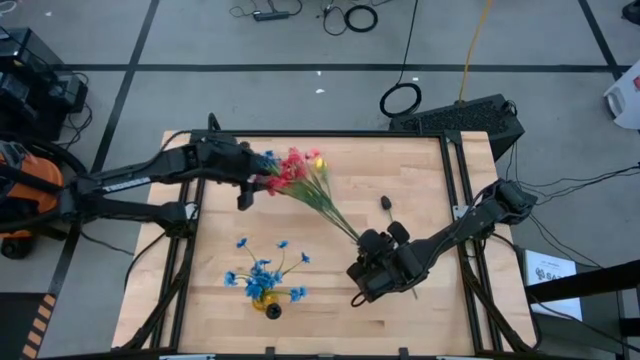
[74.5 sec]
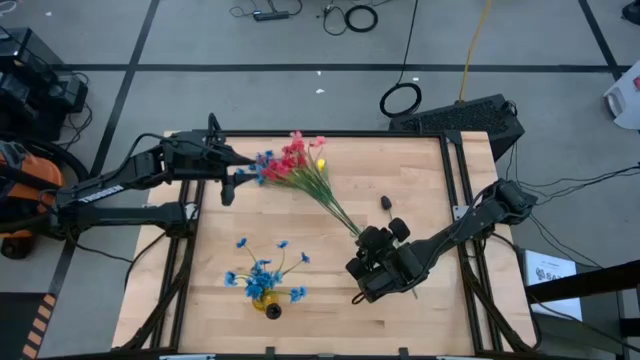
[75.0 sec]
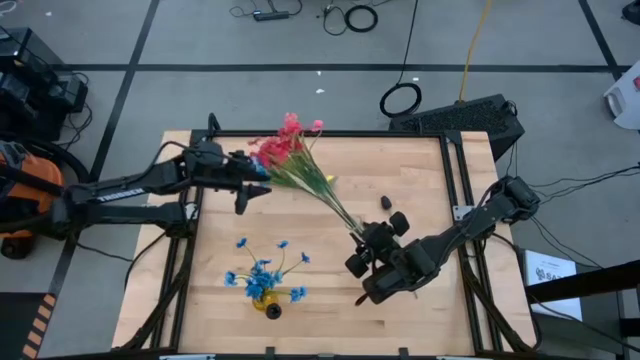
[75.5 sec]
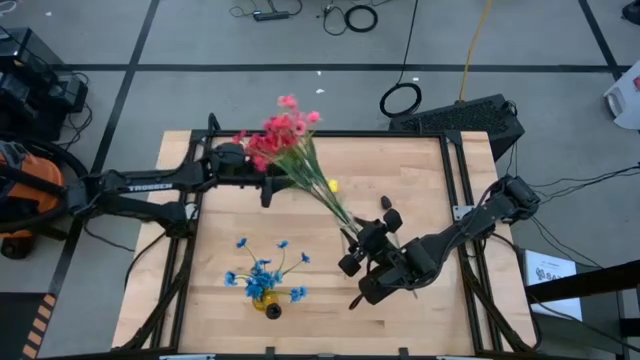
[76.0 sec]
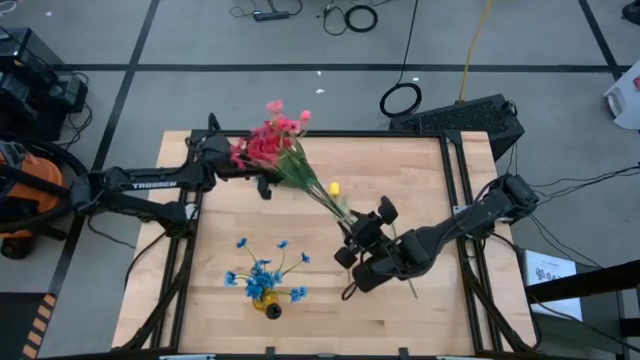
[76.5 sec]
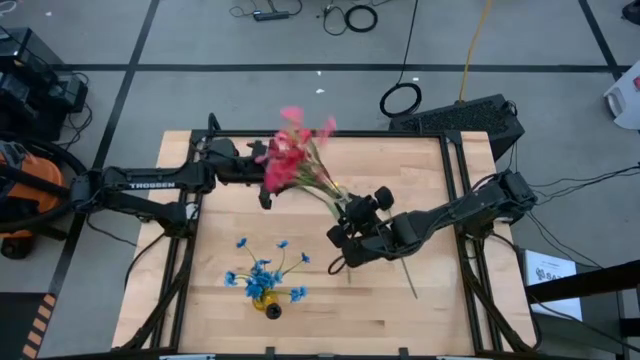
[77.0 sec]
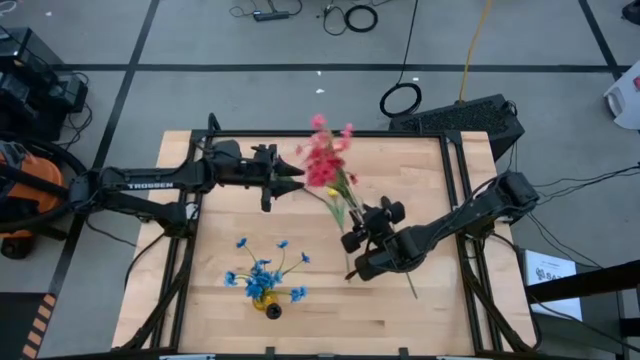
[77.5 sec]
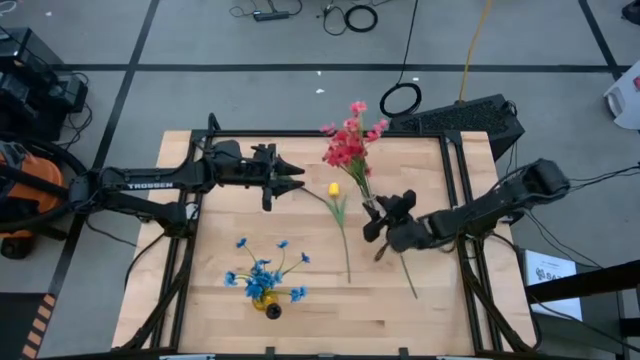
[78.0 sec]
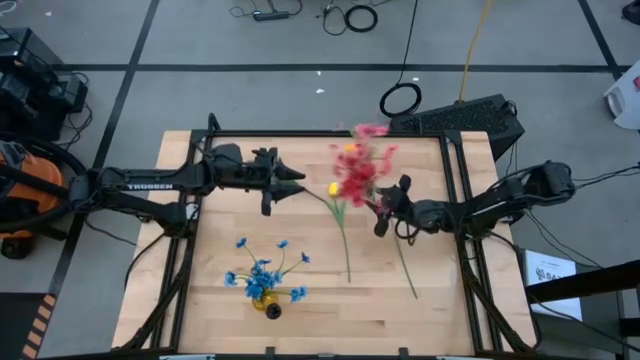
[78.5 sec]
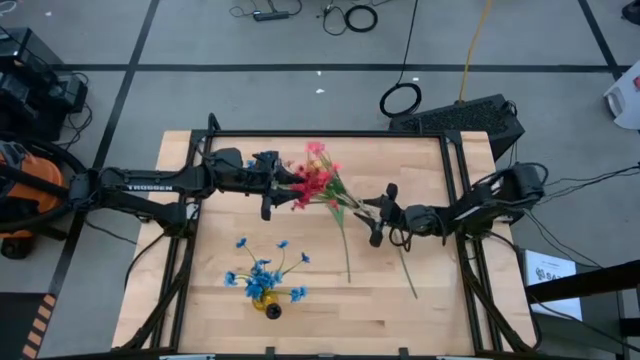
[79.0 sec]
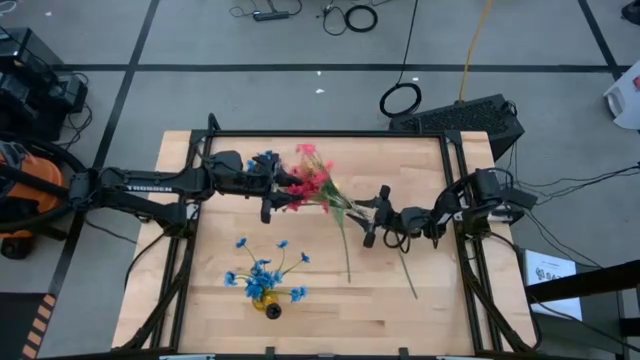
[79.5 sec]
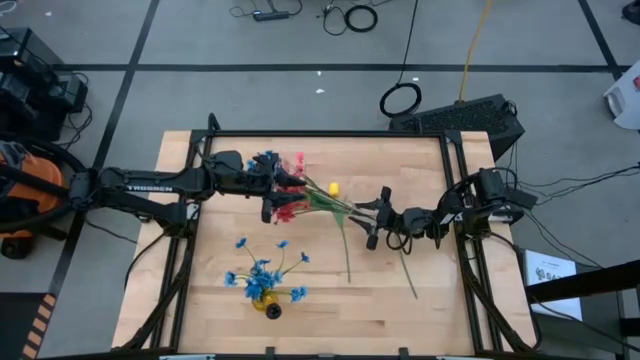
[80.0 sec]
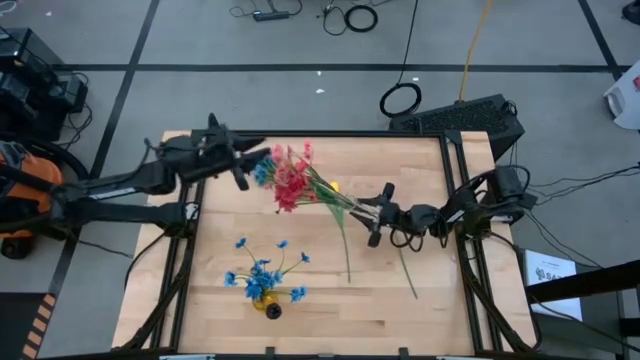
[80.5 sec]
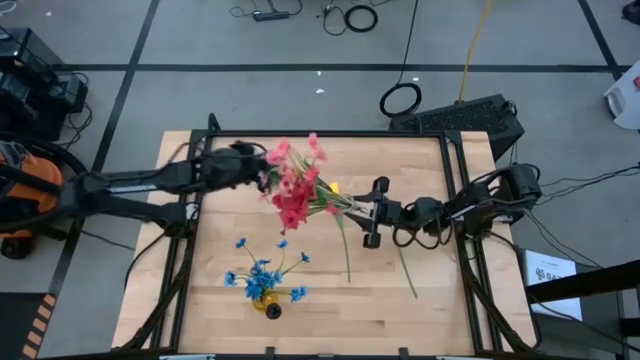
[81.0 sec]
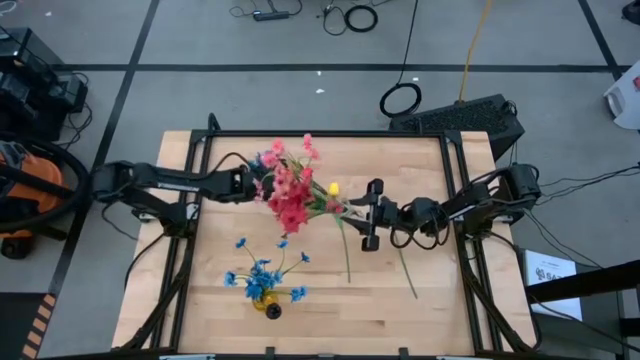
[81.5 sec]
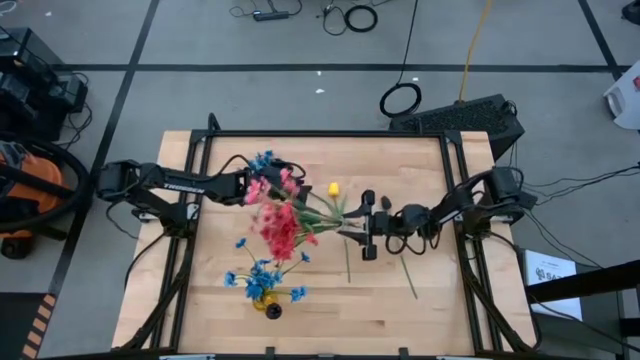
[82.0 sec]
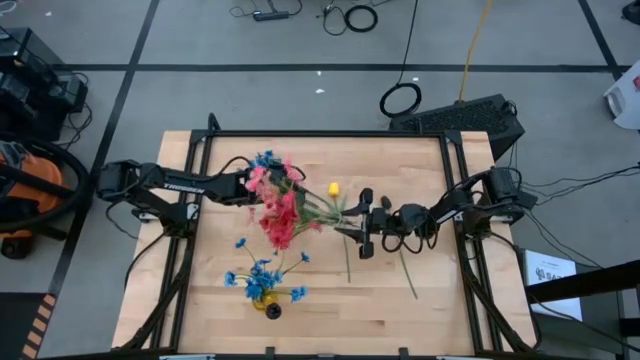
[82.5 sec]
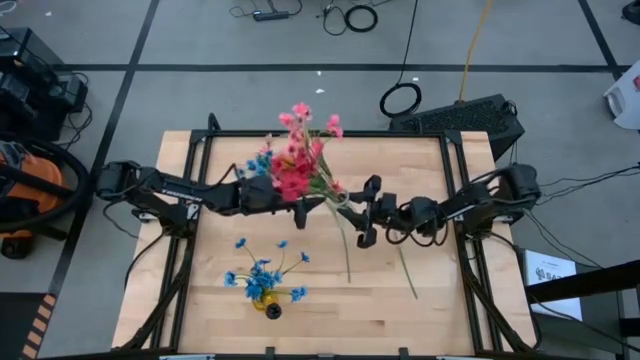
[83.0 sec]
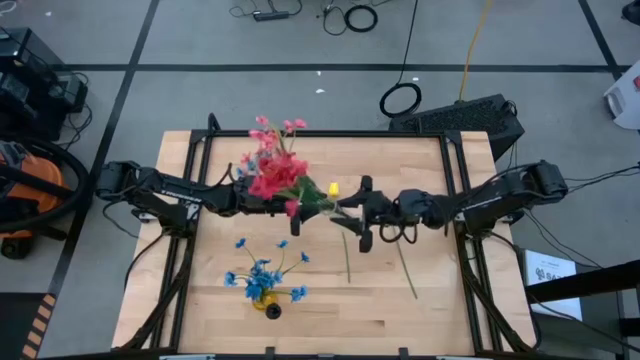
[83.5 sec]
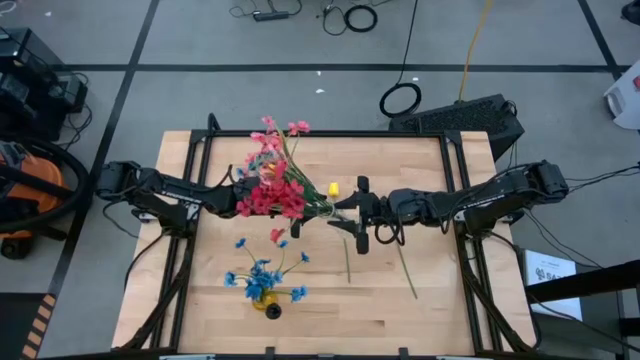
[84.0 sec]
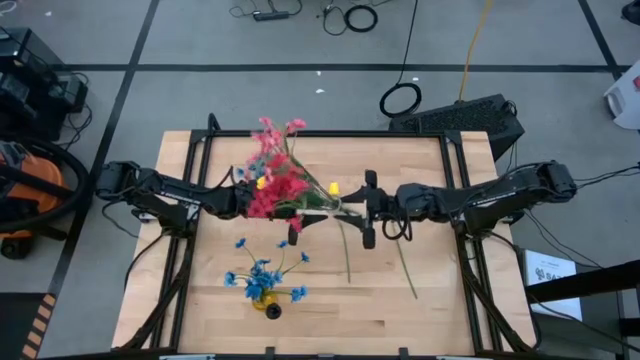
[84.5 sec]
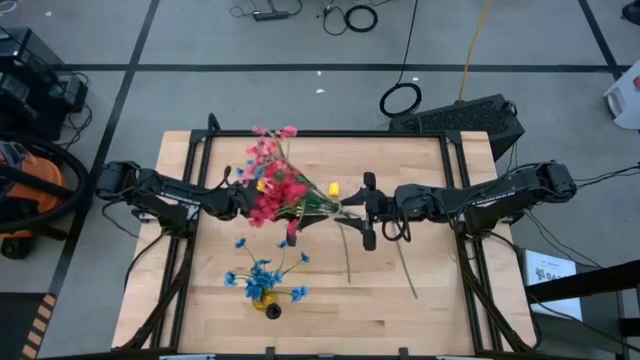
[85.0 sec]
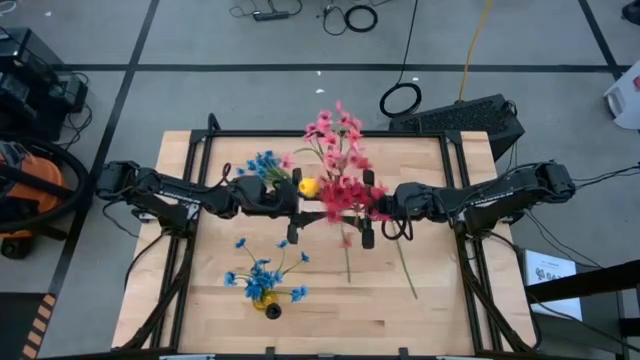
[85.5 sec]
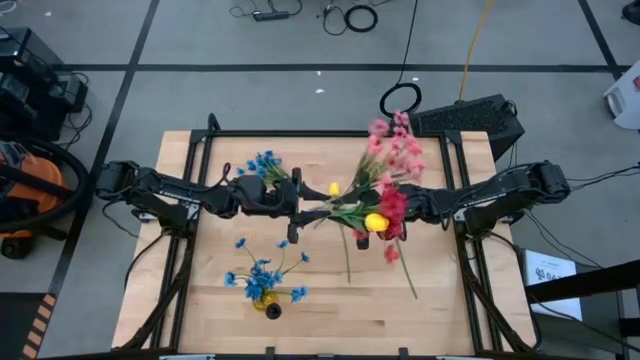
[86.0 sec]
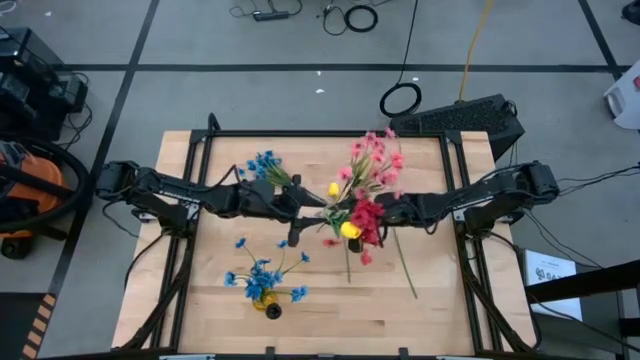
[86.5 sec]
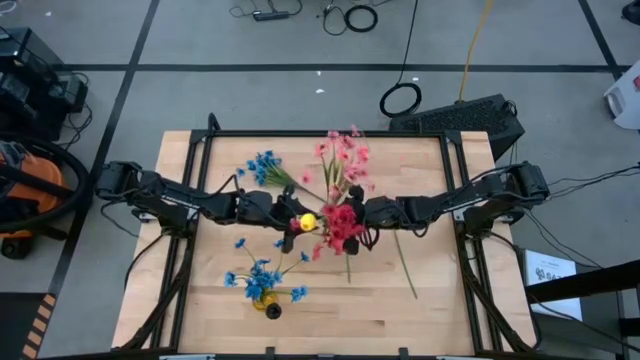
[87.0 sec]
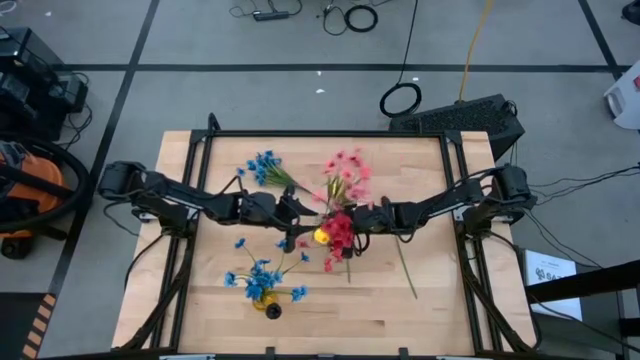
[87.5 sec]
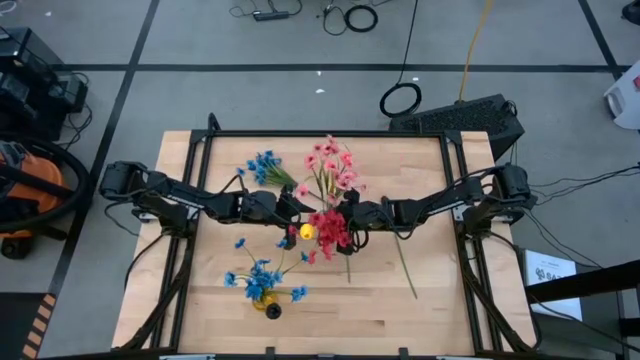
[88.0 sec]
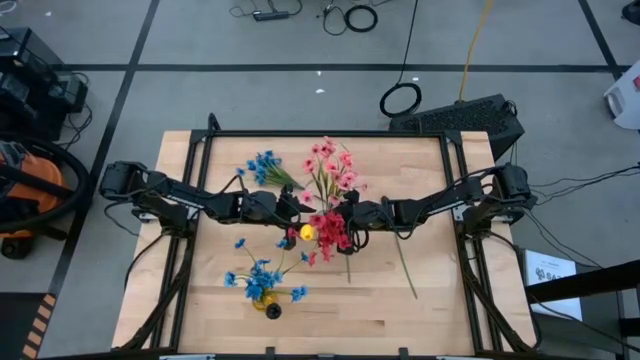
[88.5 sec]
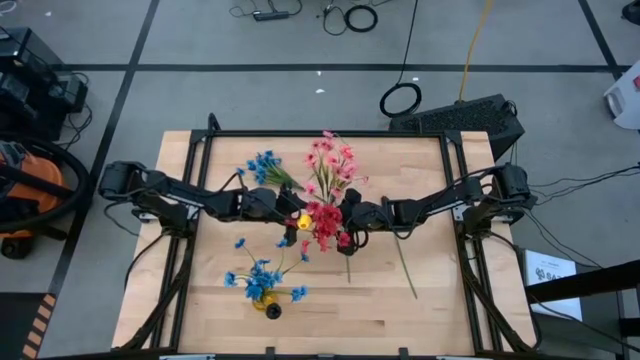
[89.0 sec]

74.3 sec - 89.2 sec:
Task: Sort flowers into vase by color
Put the yellow tulip into the transparent vase

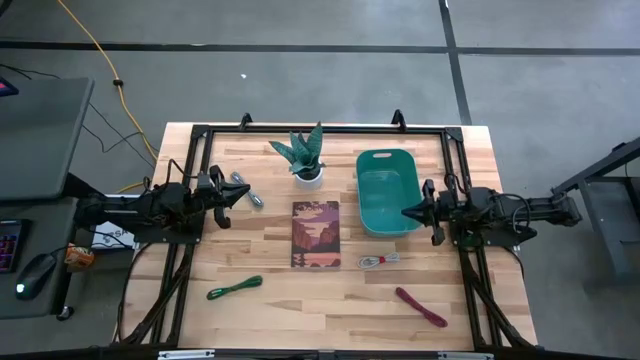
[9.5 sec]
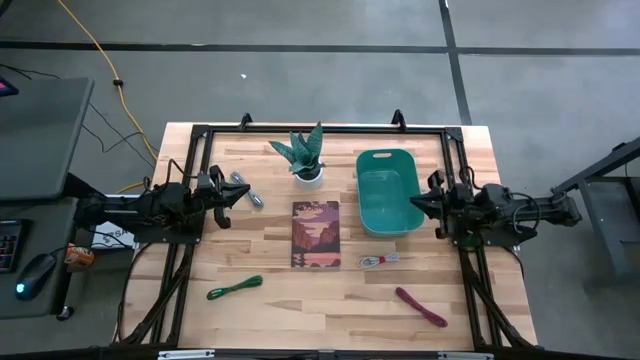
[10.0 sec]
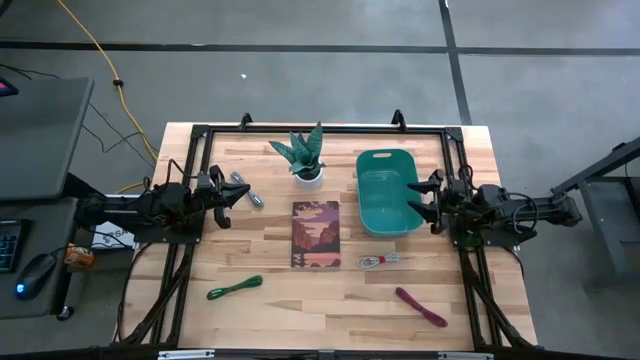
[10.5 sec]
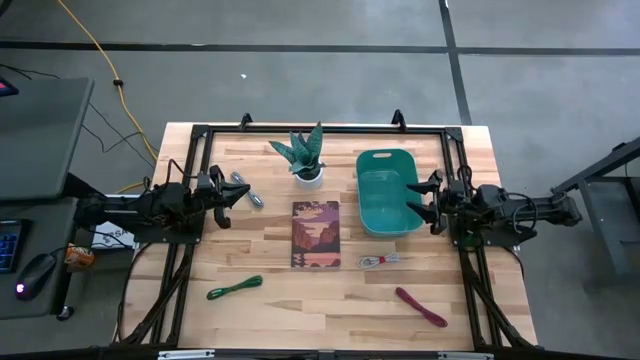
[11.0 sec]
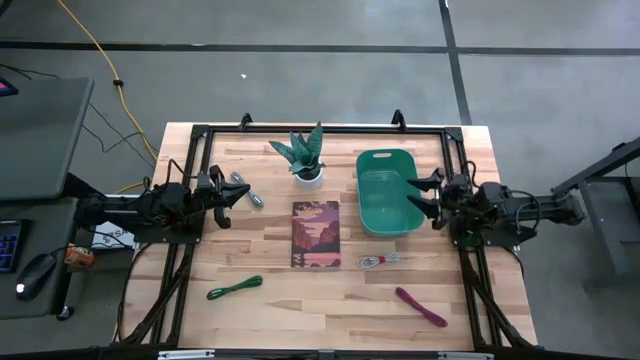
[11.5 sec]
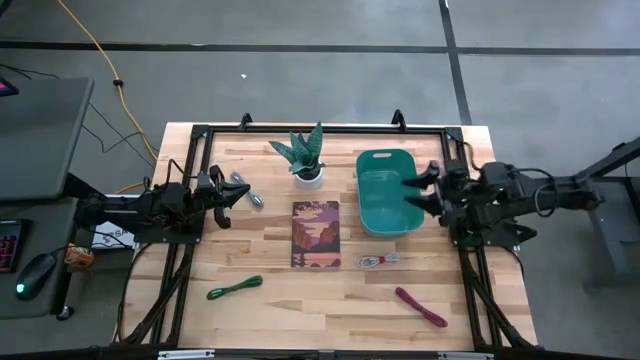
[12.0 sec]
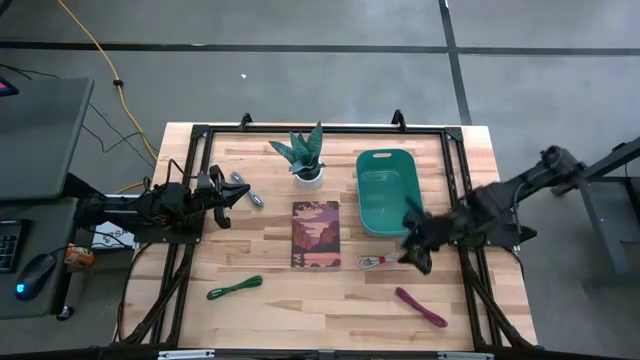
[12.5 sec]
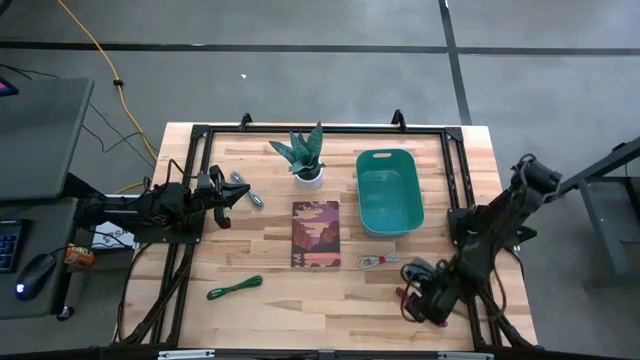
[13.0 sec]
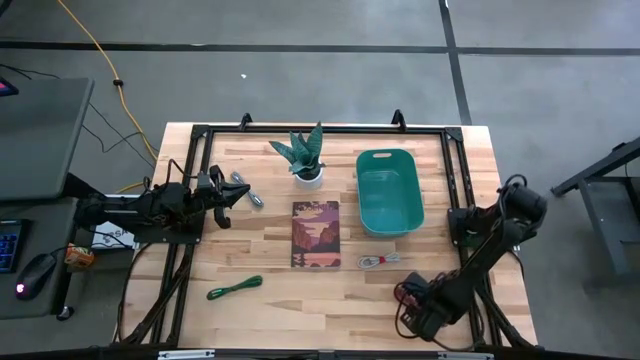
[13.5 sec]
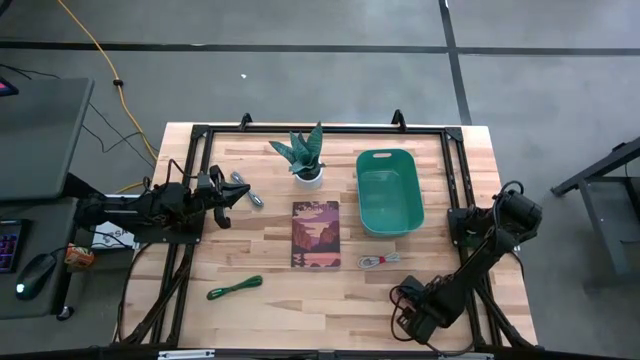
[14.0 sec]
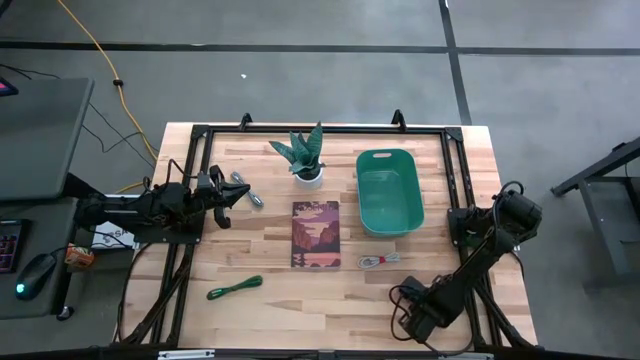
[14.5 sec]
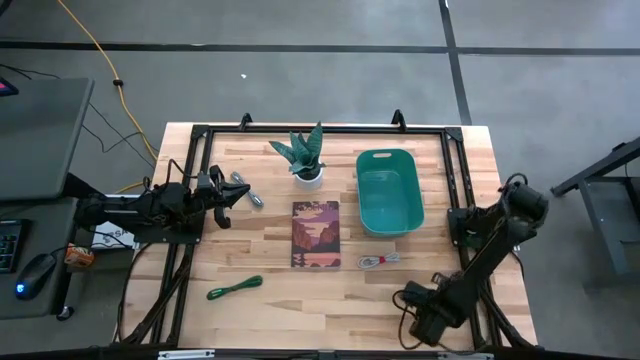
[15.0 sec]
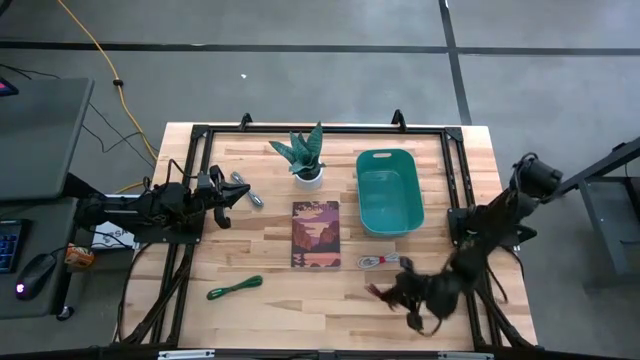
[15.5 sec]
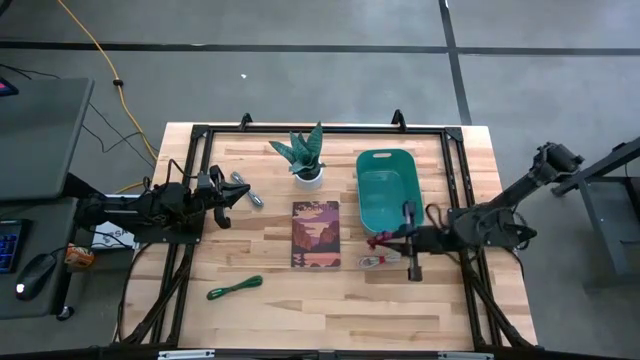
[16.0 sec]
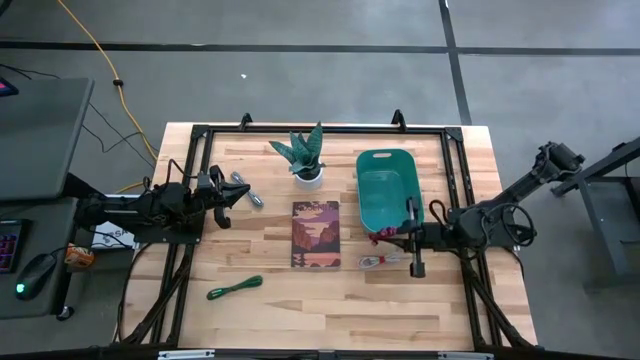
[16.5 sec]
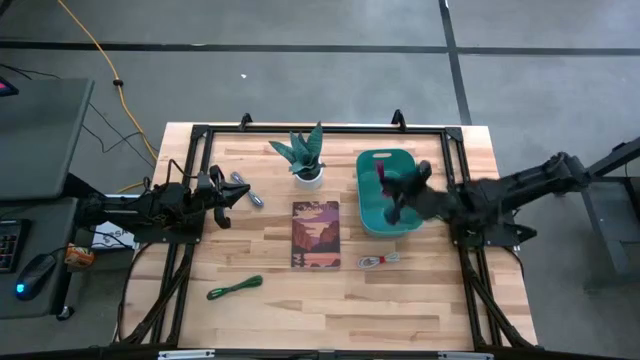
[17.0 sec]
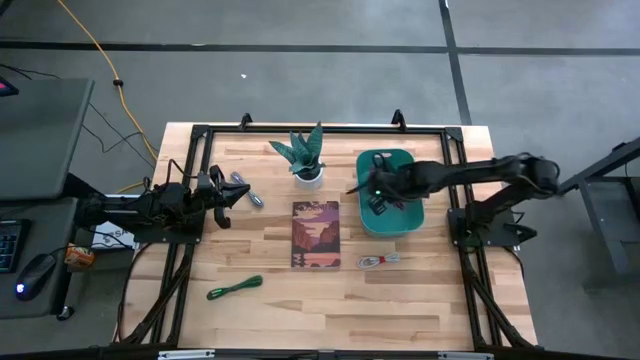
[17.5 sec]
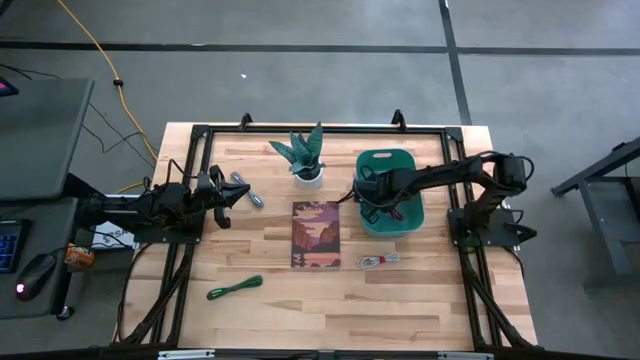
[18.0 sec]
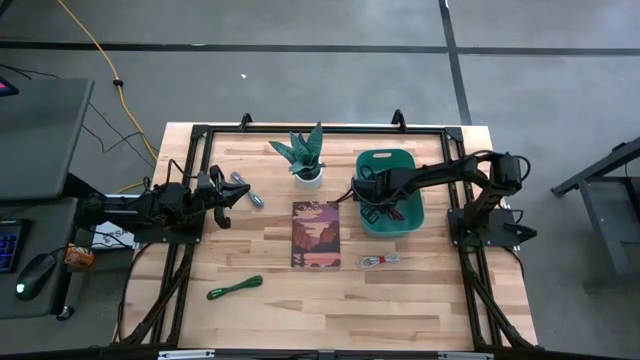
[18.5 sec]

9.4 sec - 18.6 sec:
Task: Pick and place USB-C Cables
Put the pink charger cable into the green bin
